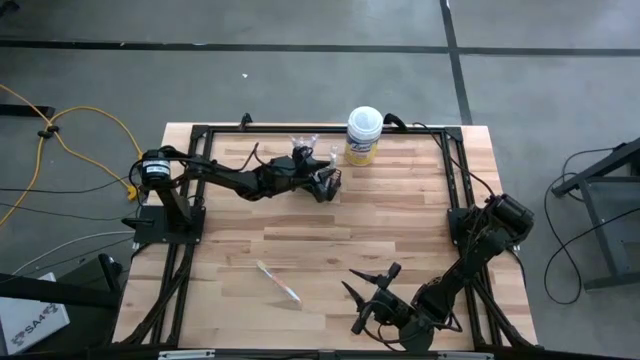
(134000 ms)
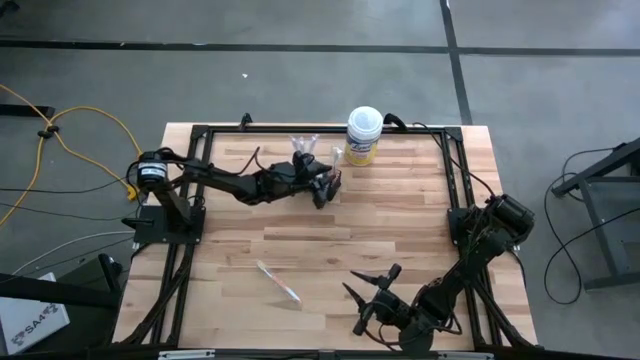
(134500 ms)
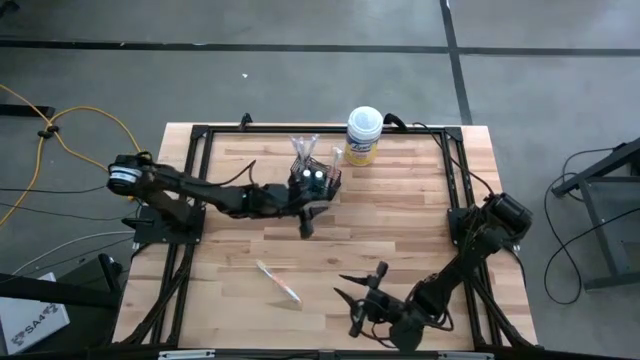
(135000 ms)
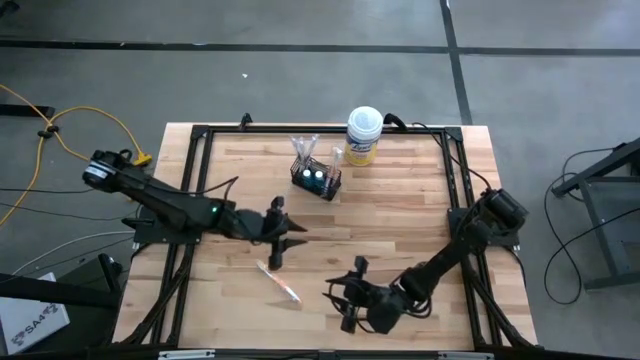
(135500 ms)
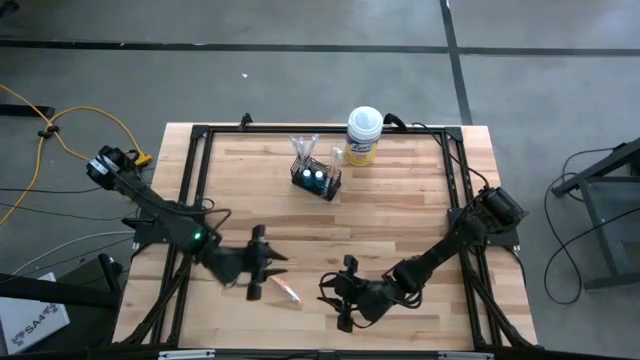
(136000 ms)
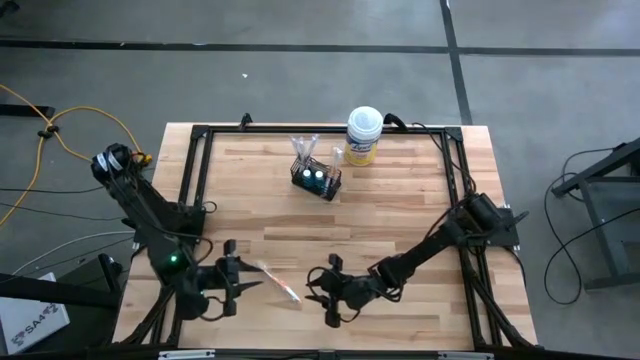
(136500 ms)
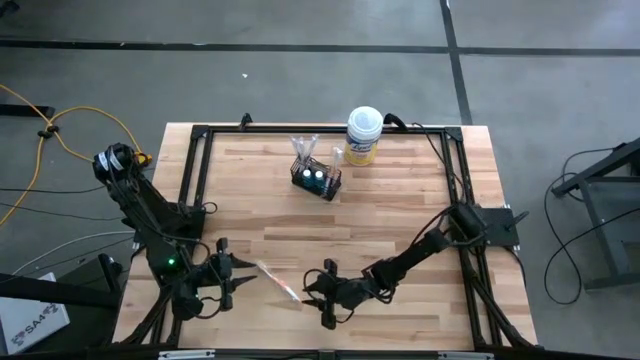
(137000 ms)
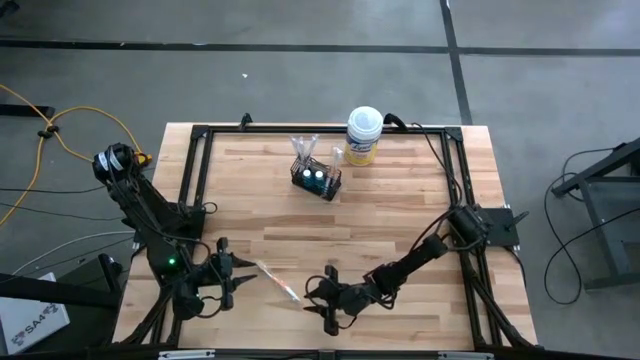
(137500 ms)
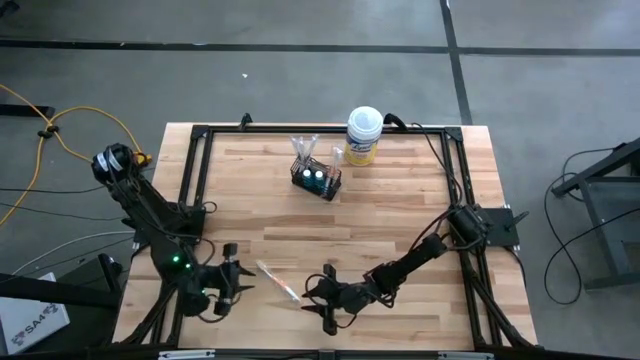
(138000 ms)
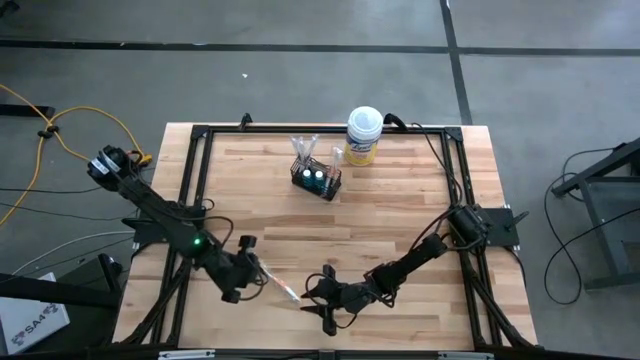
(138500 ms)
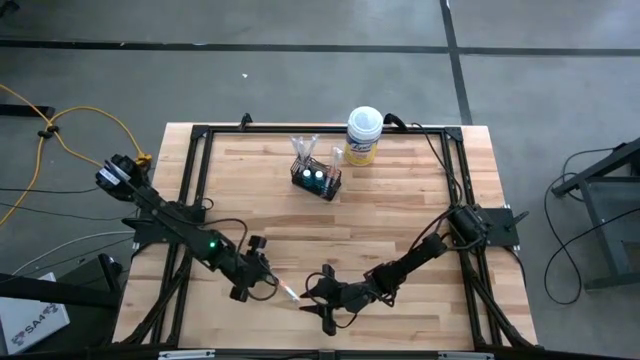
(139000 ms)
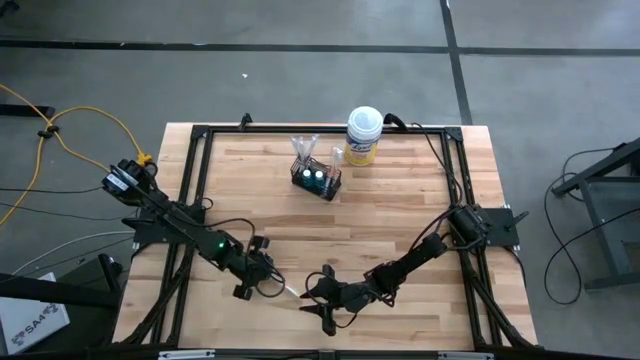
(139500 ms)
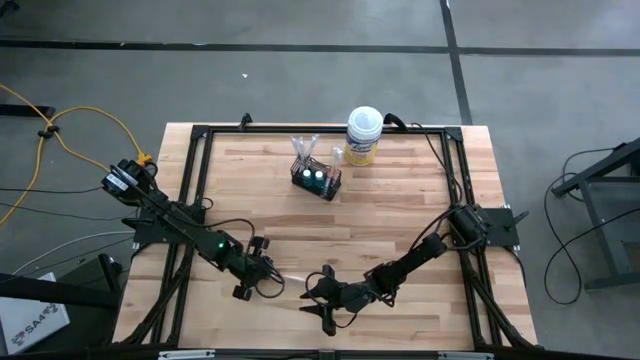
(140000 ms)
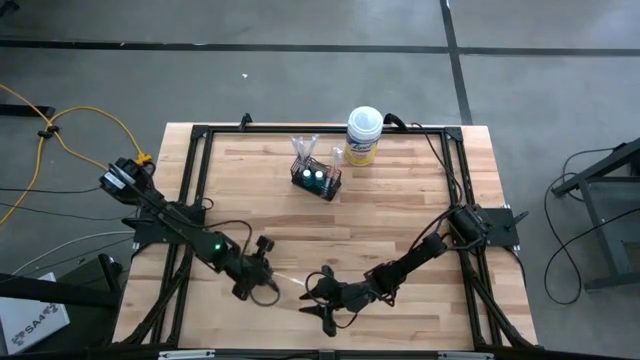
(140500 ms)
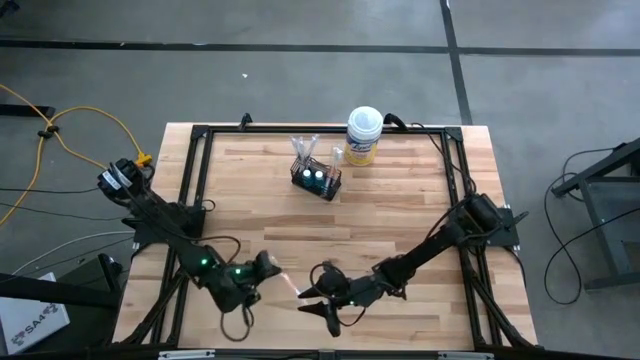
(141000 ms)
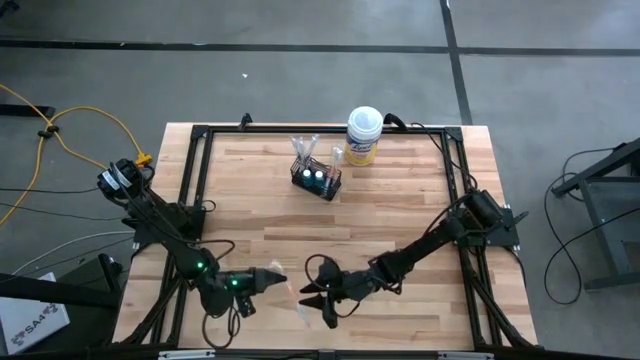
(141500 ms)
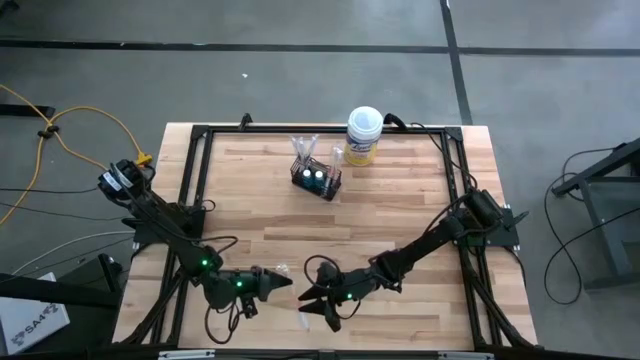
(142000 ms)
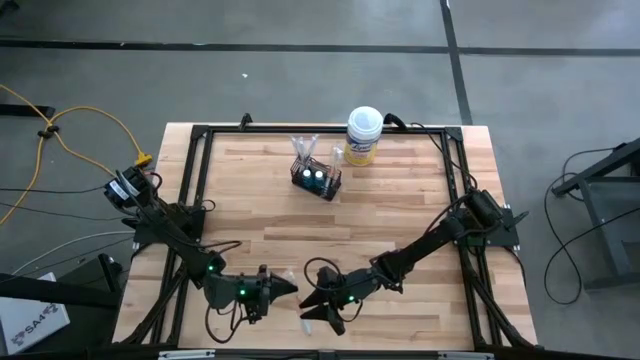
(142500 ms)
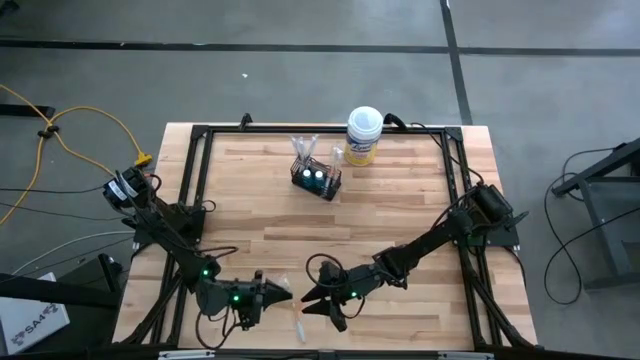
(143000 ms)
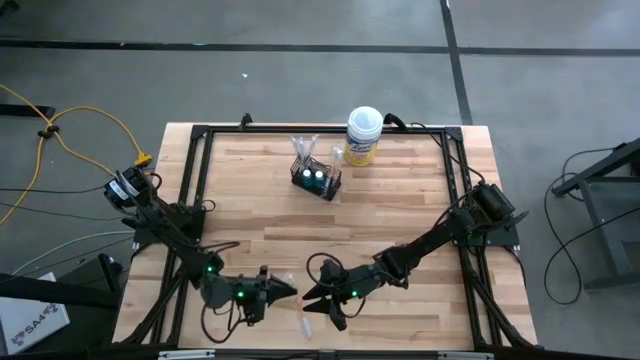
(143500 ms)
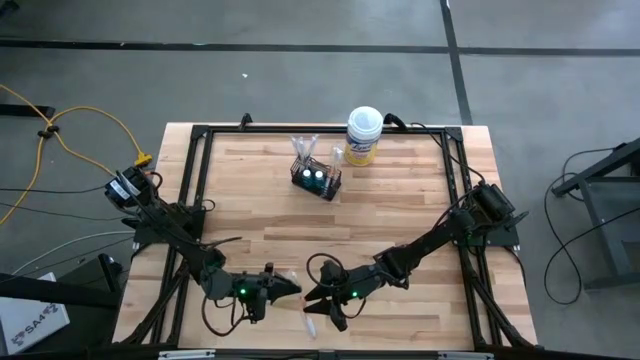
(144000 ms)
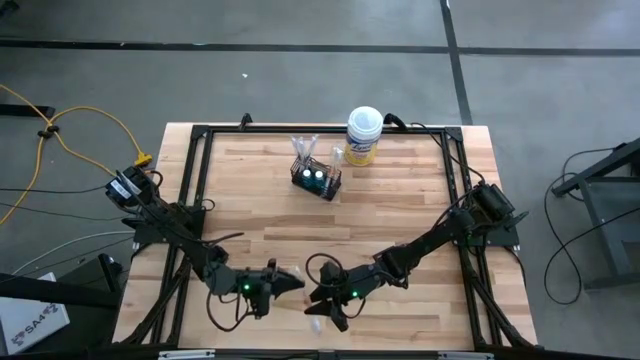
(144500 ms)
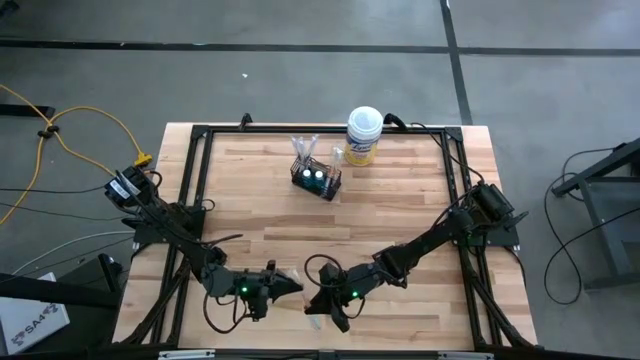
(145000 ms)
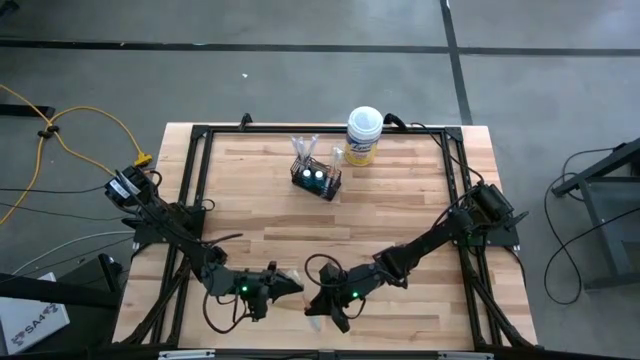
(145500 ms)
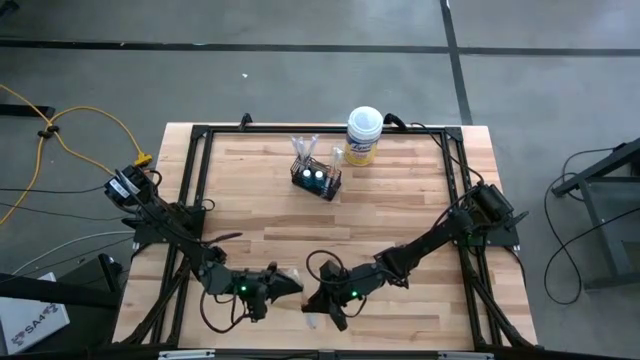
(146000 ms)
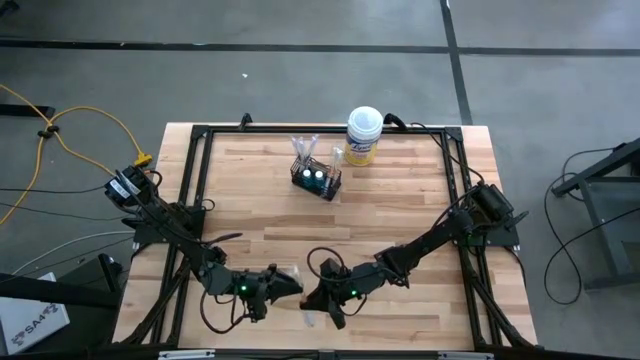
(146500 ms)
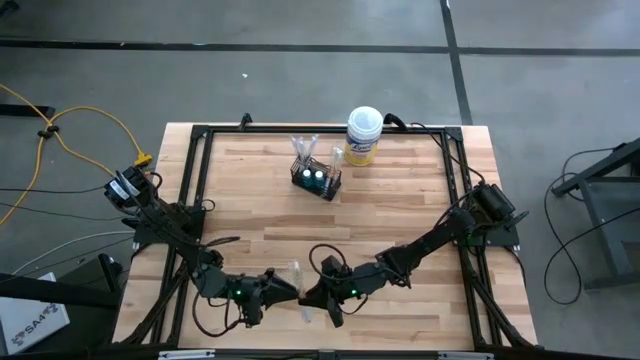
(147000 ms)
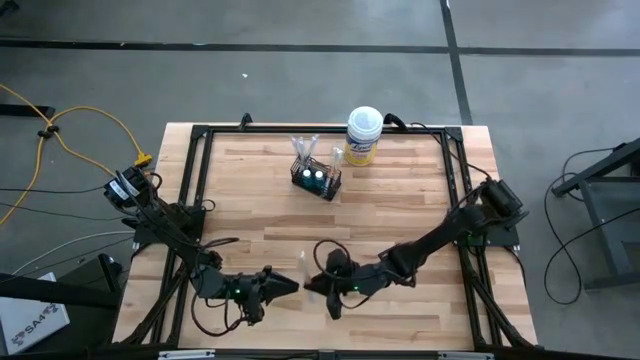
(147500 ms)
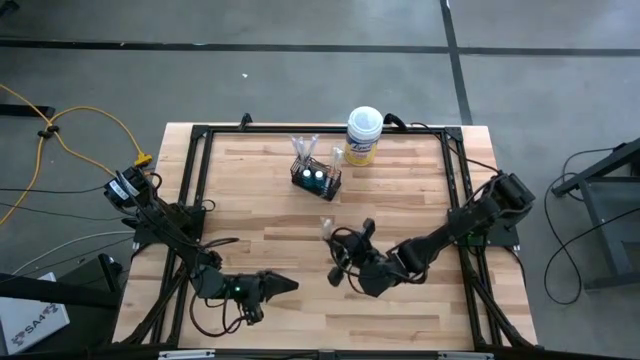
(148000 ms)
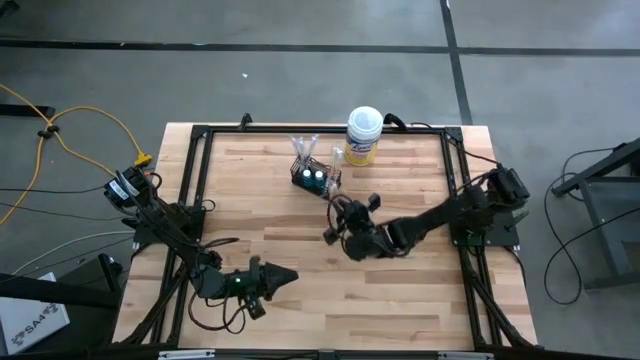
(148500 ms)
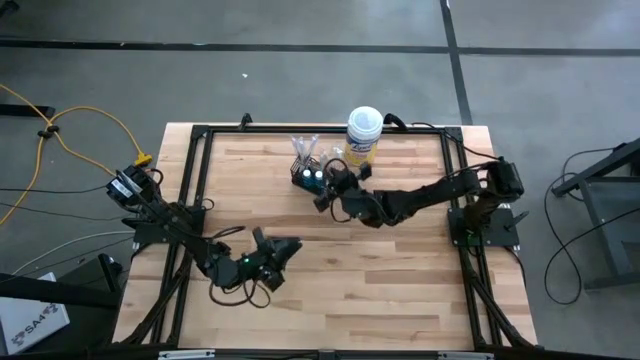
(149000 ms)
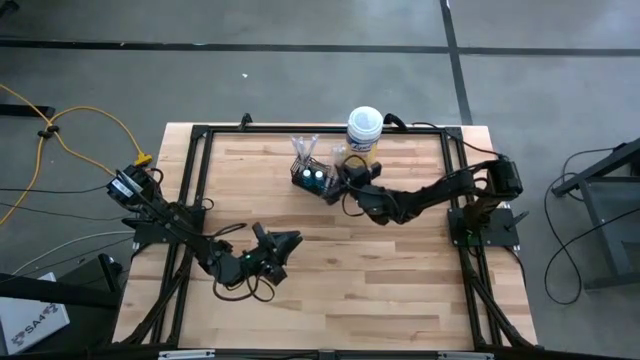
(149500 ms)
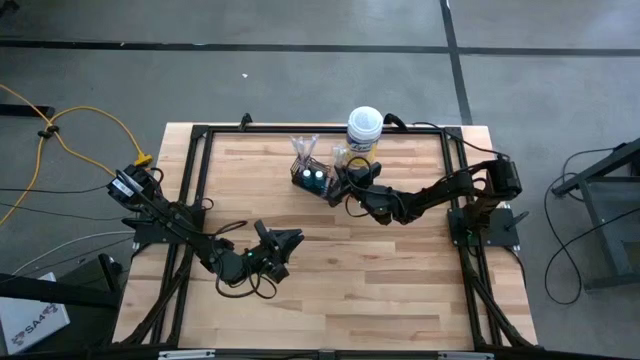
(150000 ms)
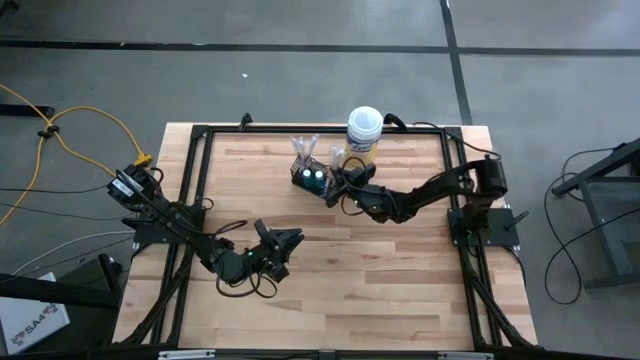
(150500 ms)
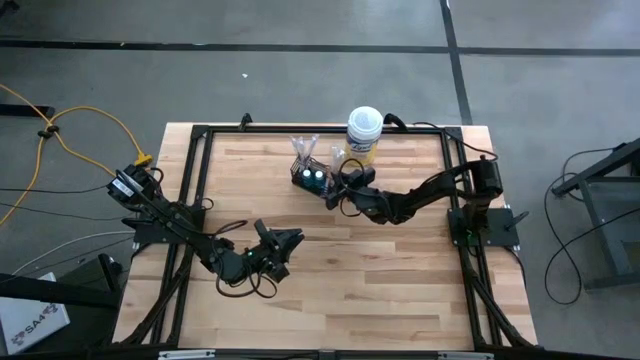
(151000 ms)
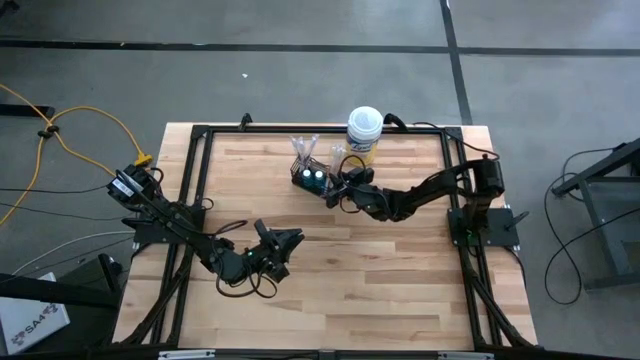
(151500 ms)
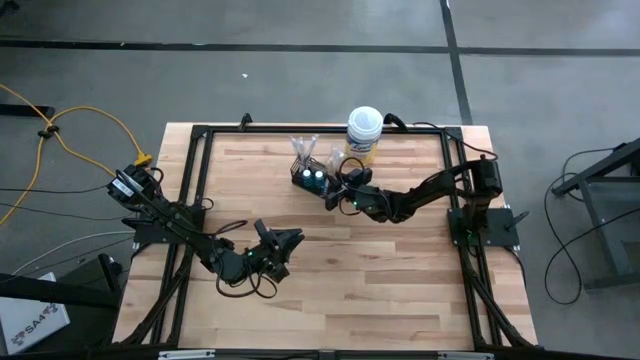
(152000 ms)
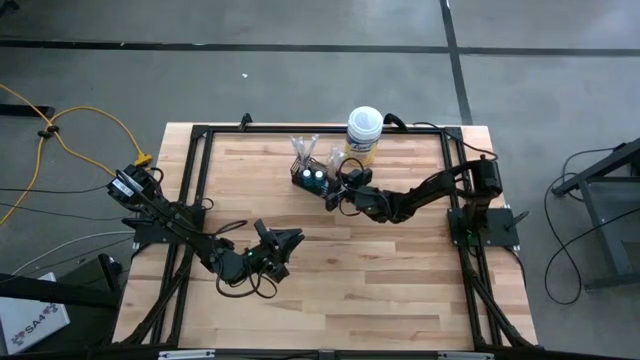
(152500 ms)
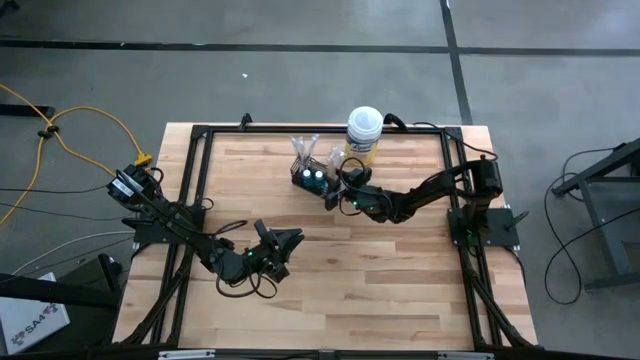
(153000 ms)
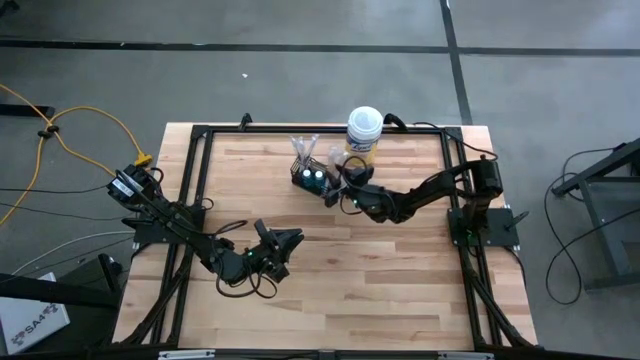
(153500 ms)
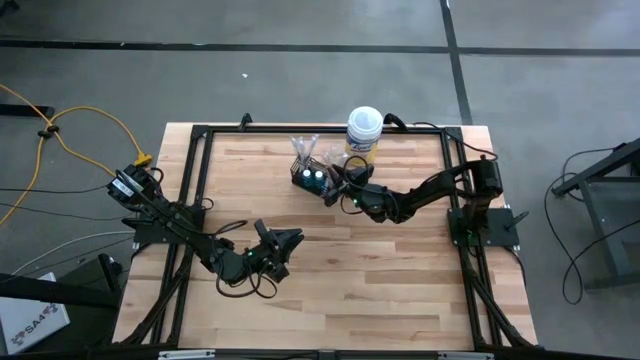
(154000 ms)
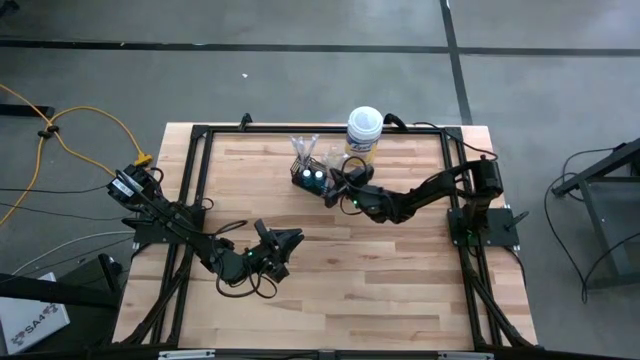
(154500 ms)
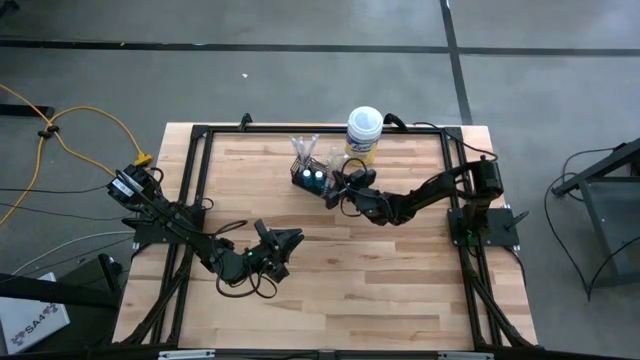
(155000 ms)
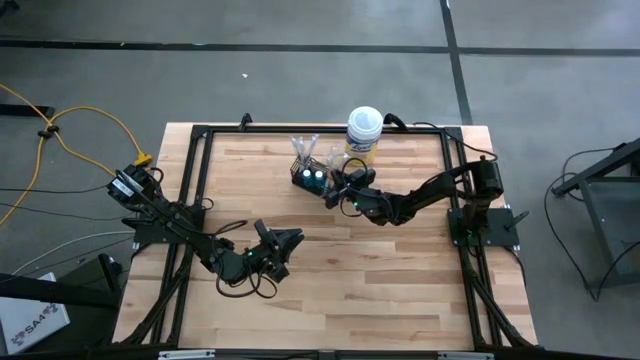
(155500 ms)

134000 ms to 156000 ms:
Task: Pick & Place toothbrushing station
Put the orange toothbrush into the black mesh organizer
